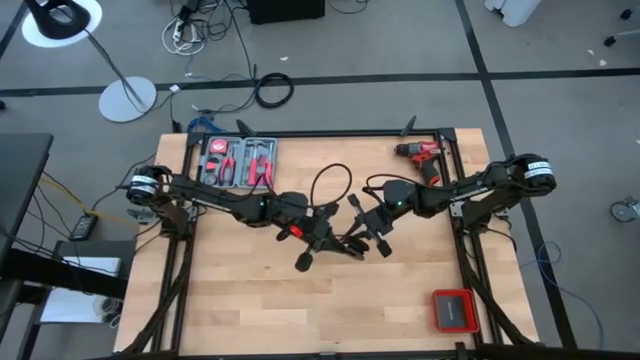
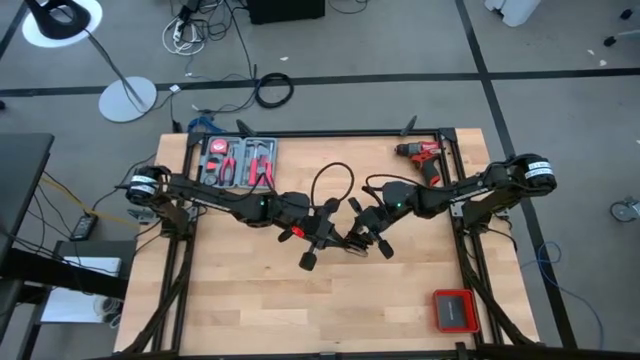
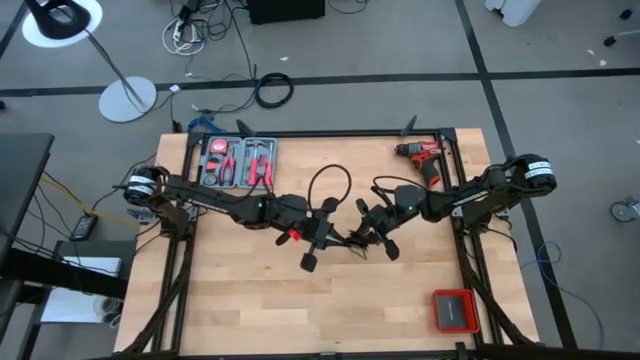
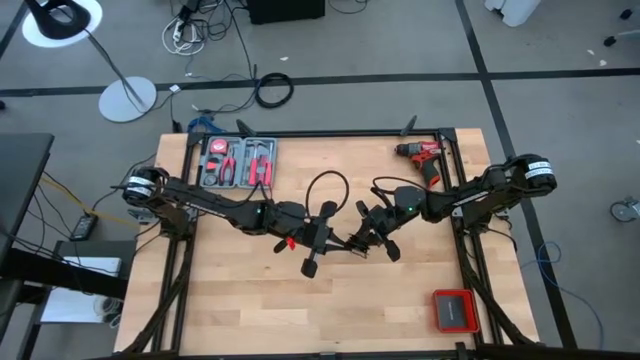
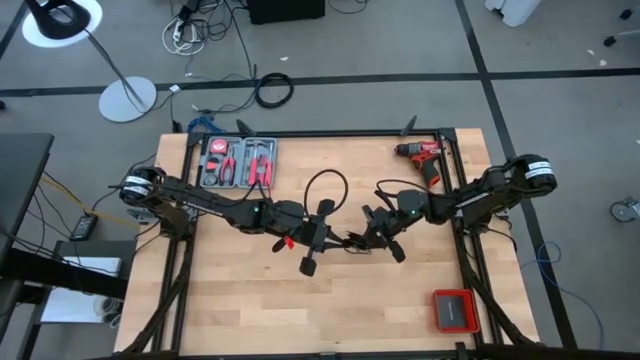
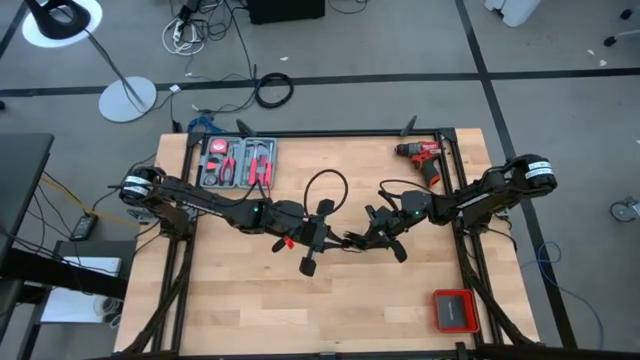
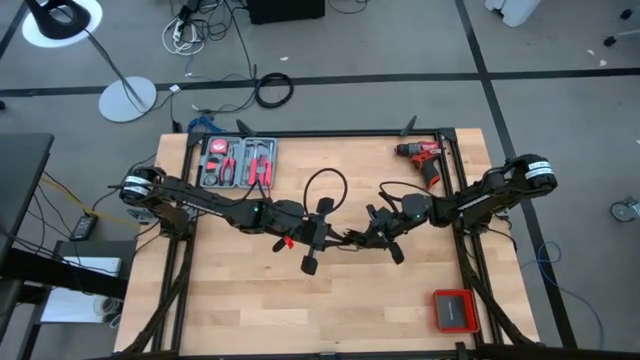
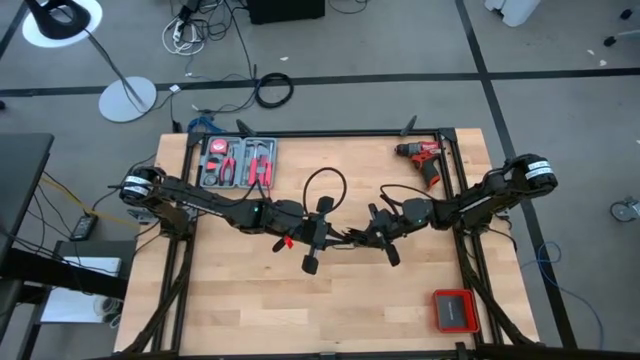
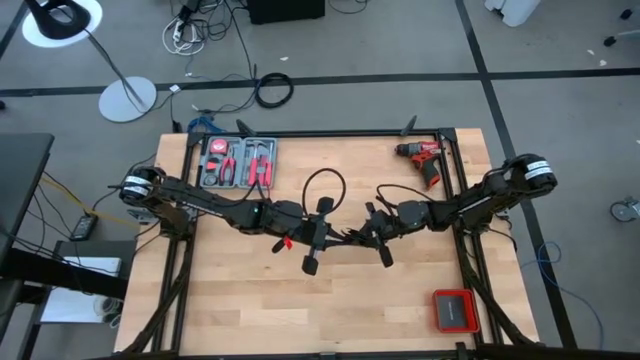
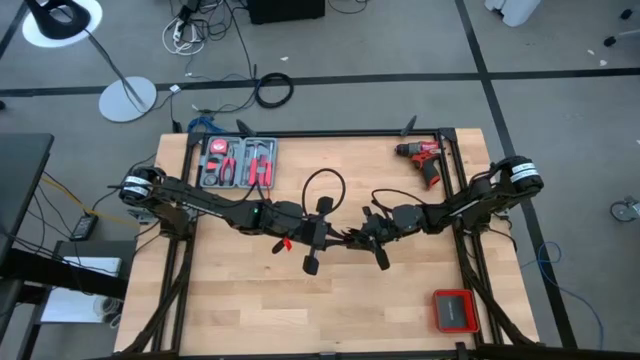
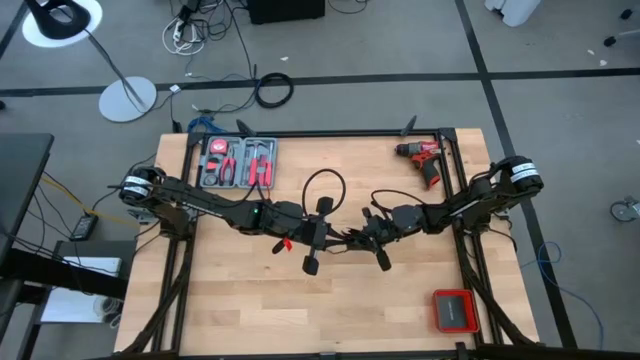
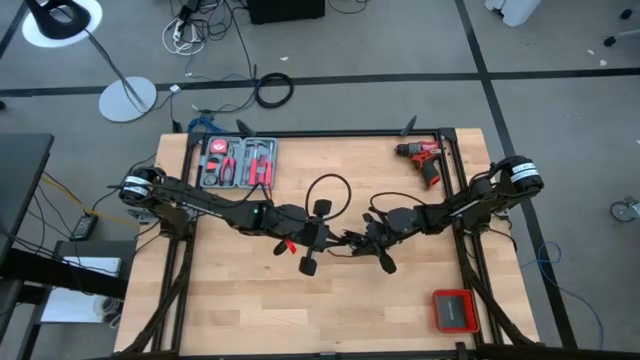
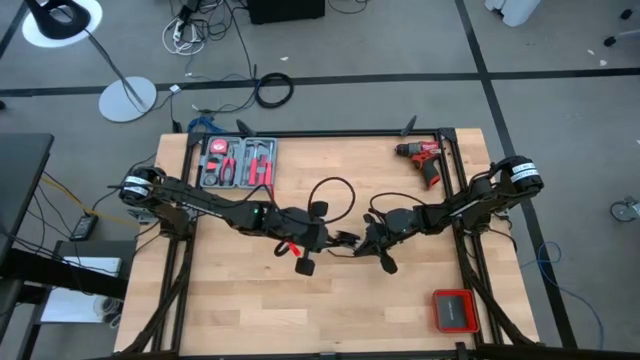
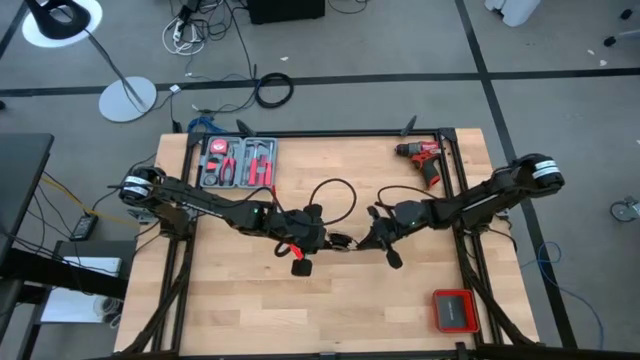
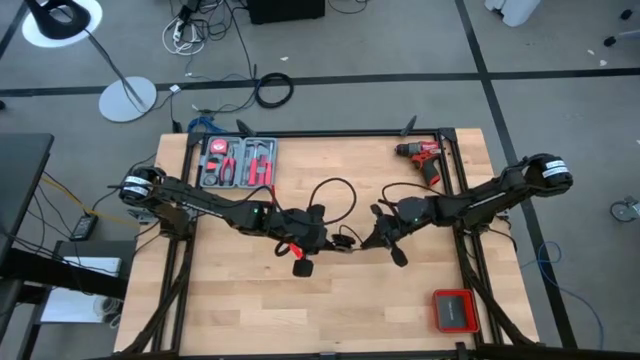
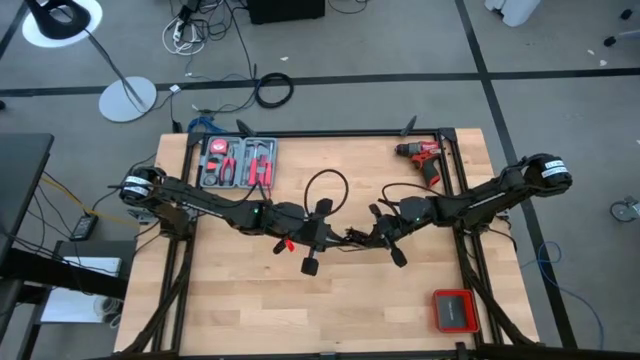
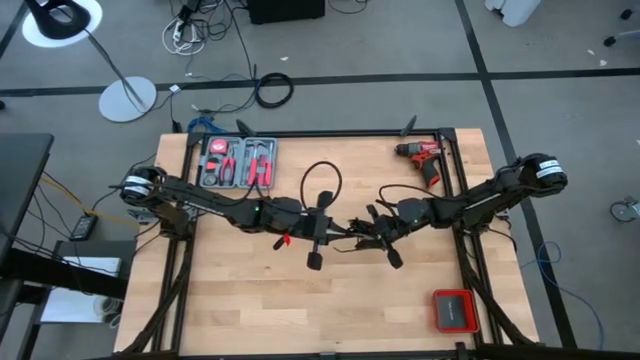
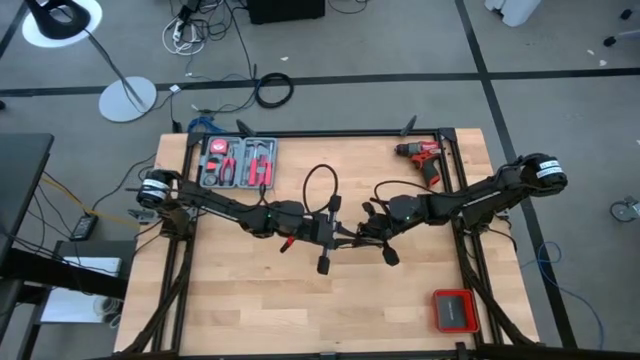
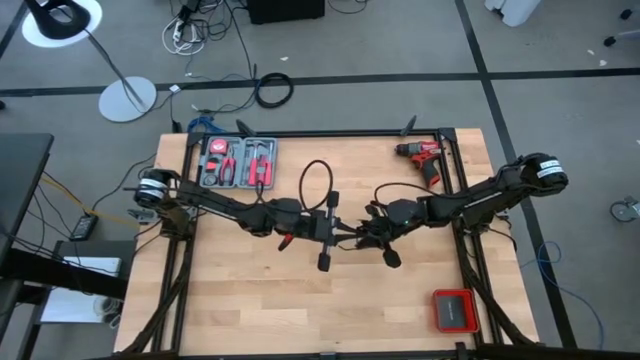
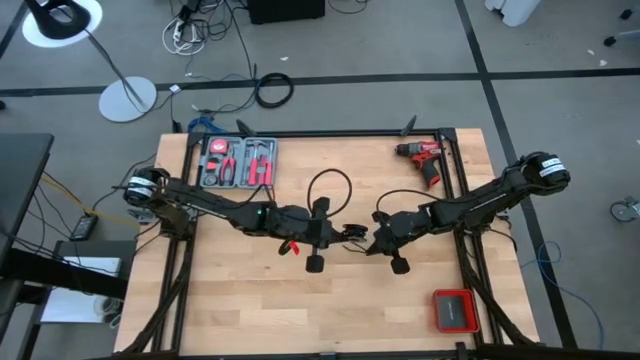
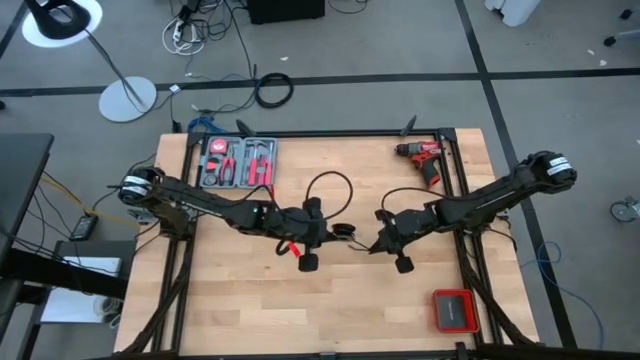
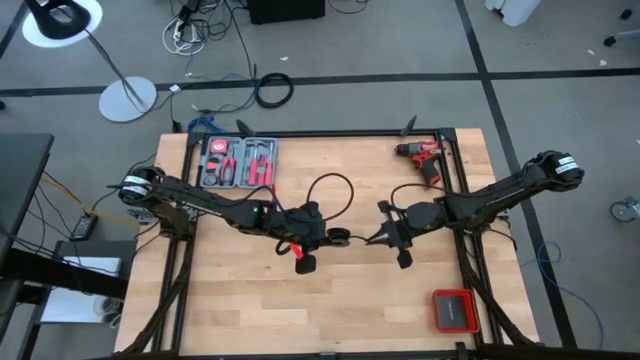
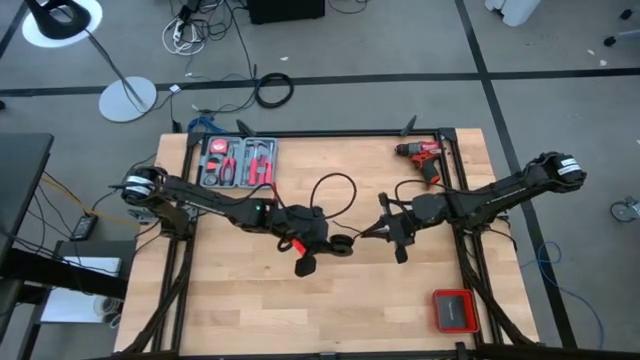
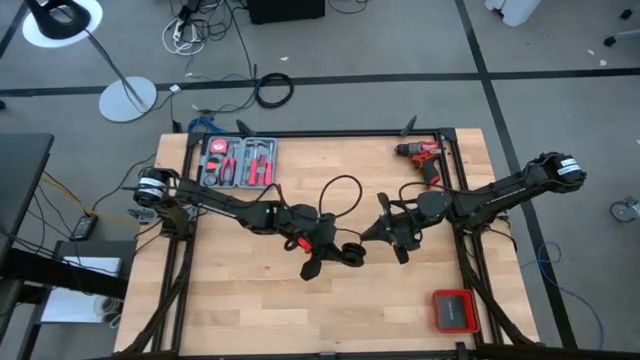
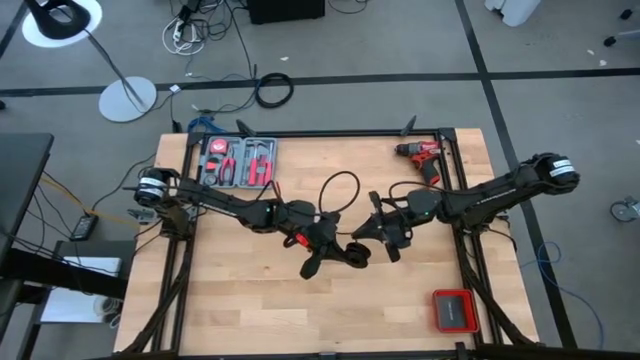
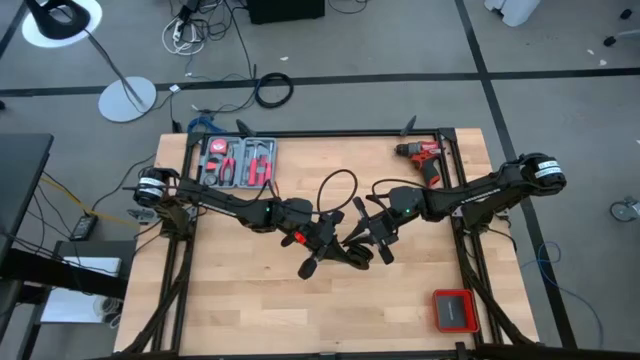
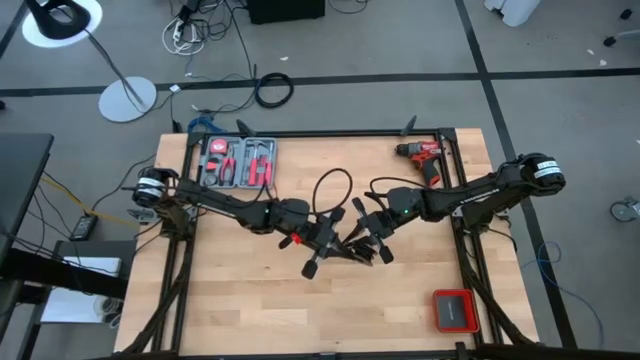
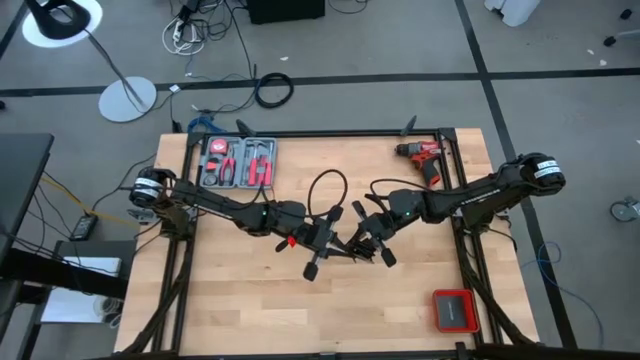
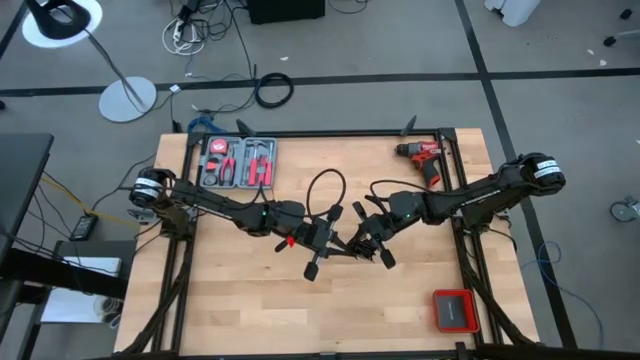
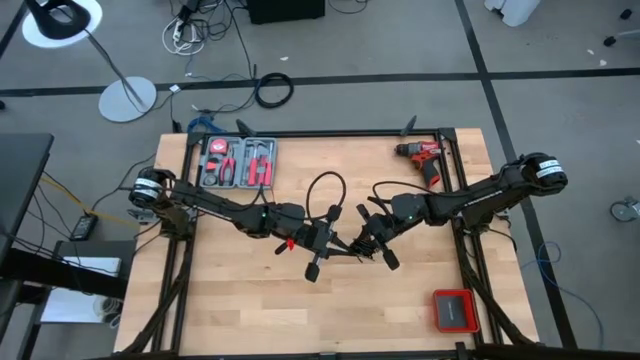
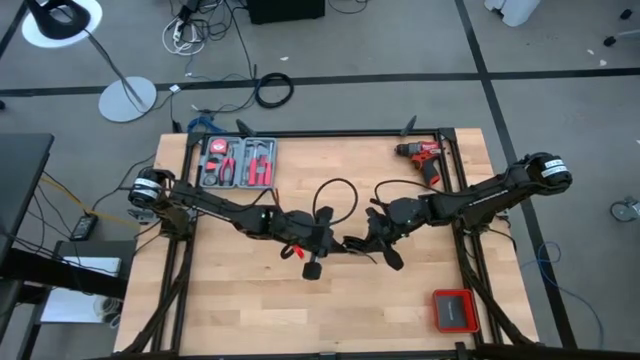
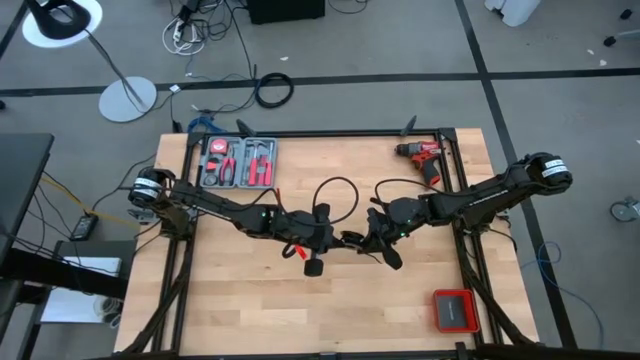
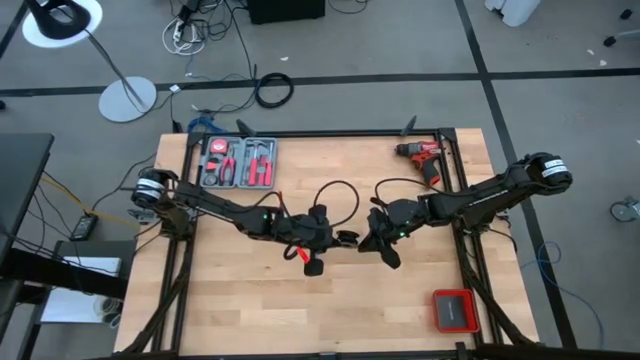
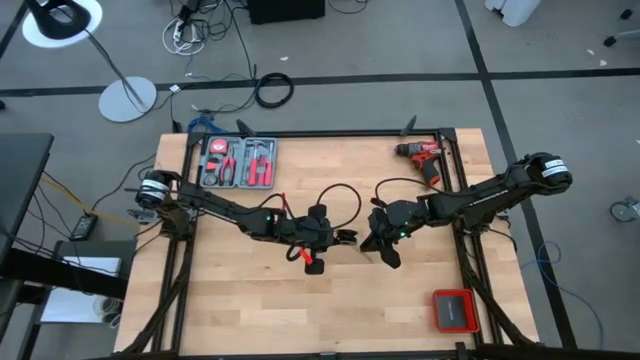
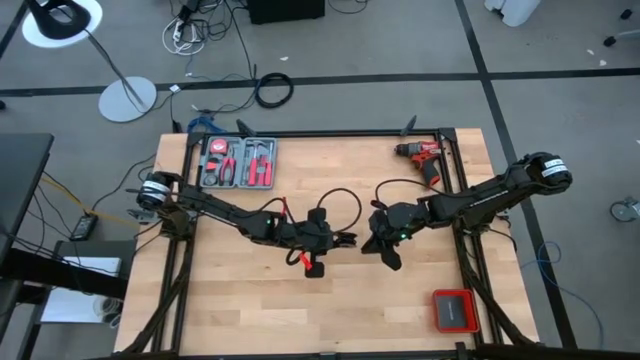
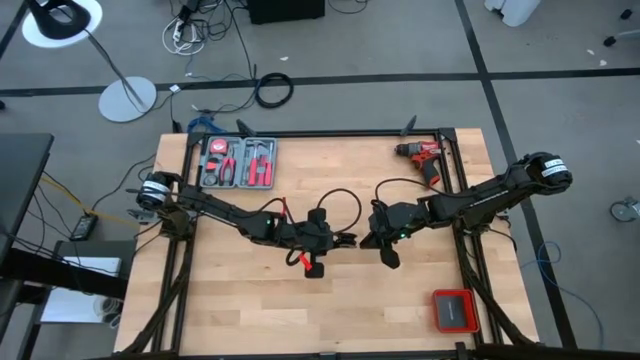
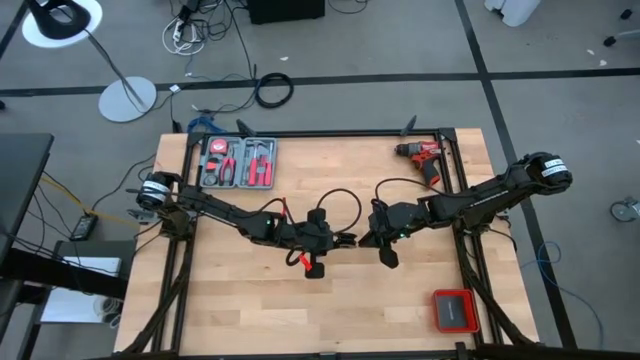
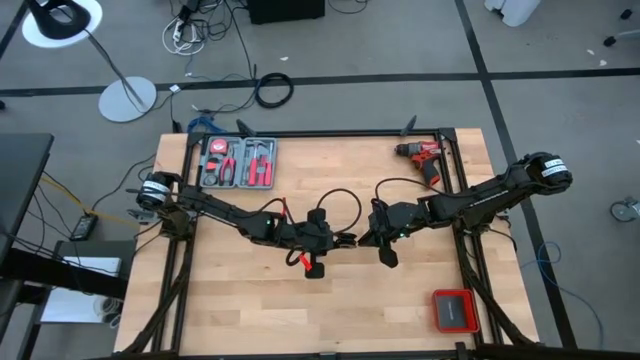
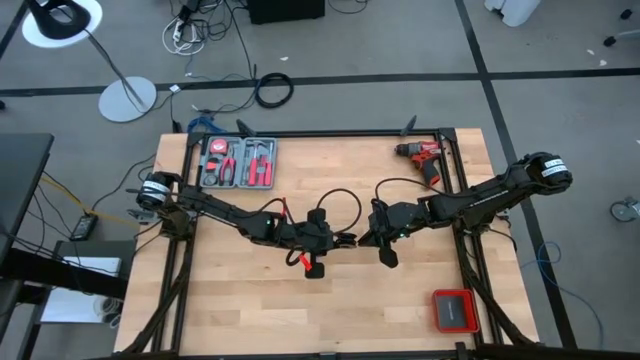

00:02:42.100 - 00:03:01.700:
Task: Coil cords
Coil the black wire on the black spool

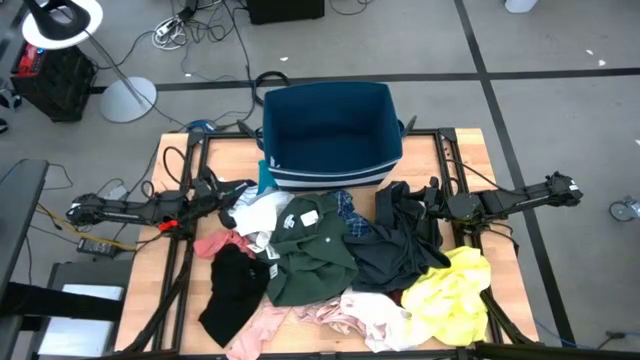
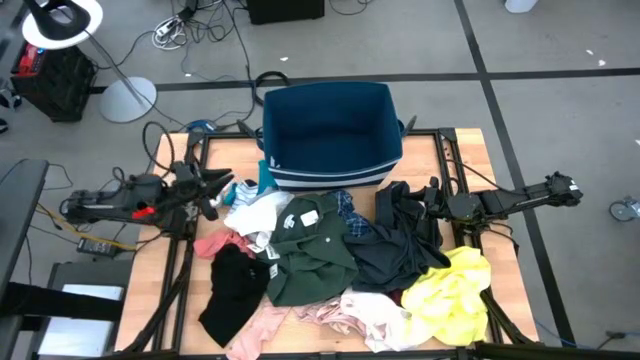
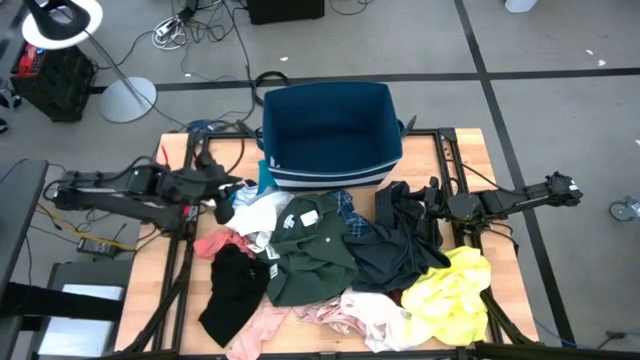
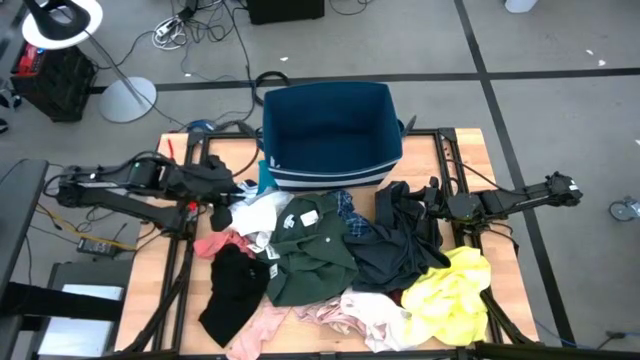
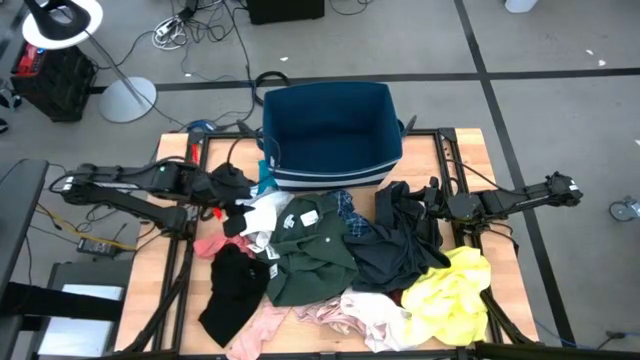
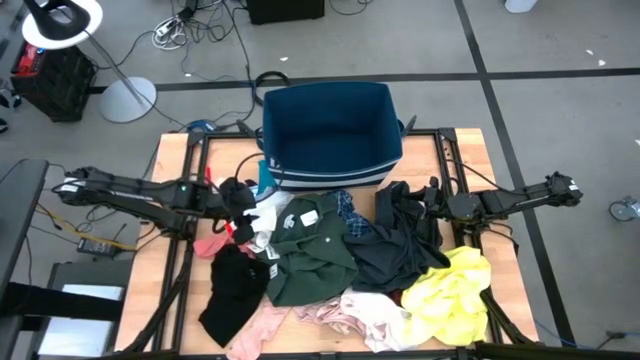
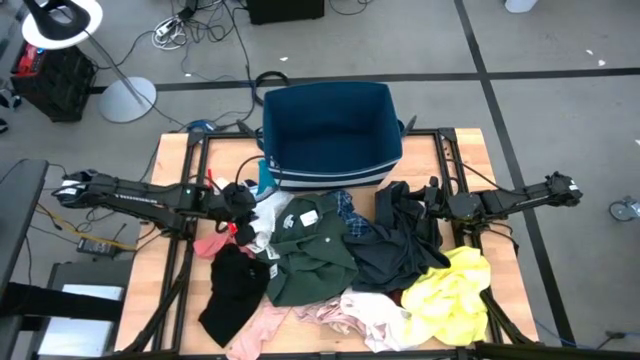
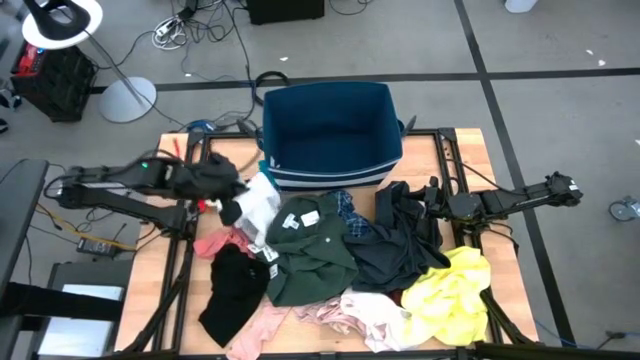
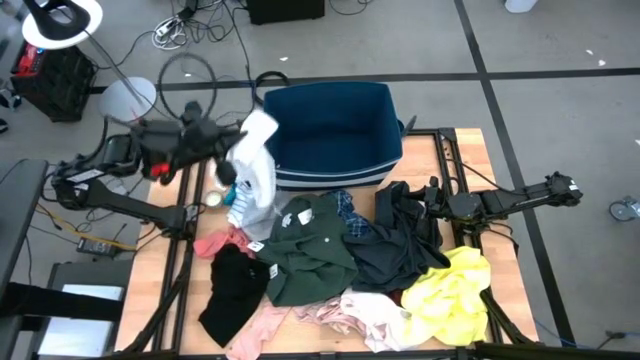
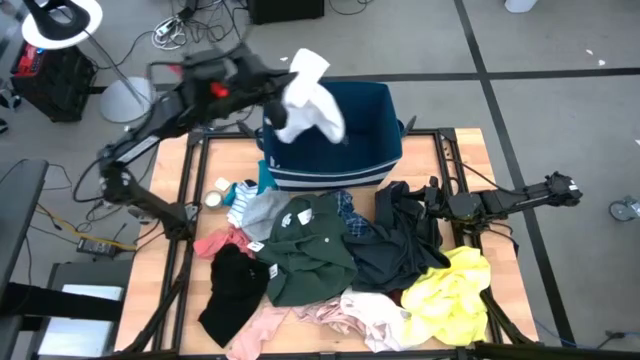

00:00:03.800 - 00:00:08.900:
Task: Sort clothes
Put the white boxer short into the blue laundry bin
